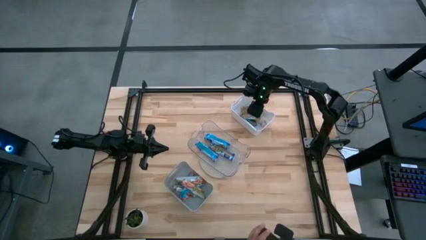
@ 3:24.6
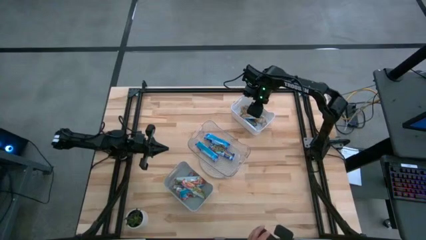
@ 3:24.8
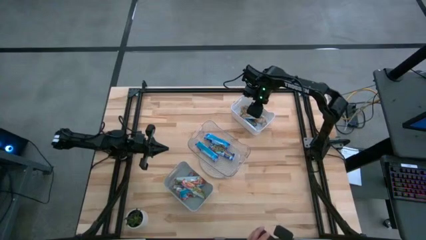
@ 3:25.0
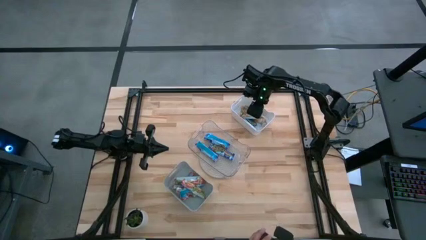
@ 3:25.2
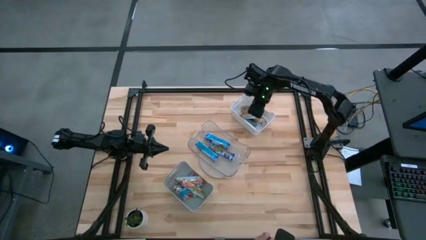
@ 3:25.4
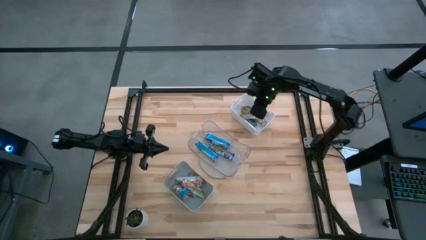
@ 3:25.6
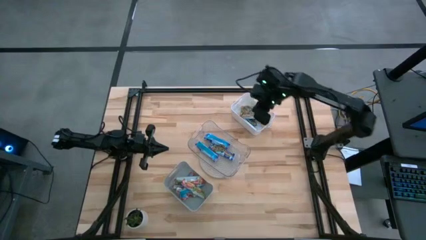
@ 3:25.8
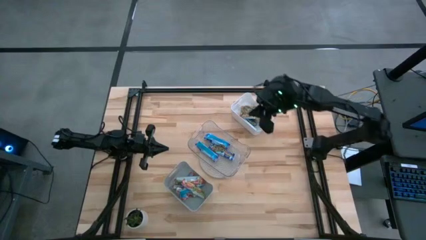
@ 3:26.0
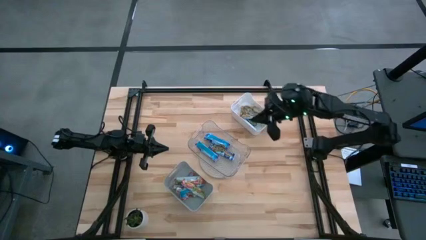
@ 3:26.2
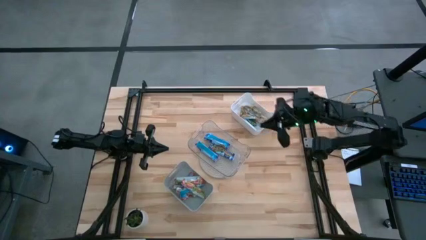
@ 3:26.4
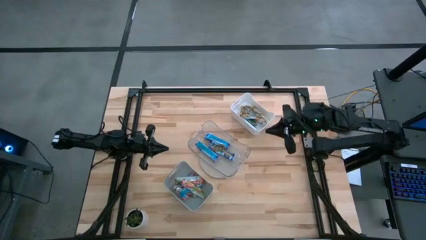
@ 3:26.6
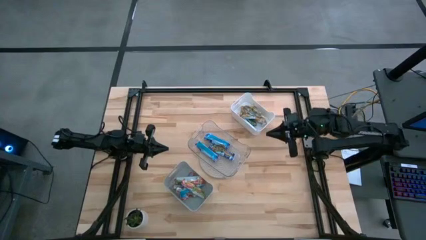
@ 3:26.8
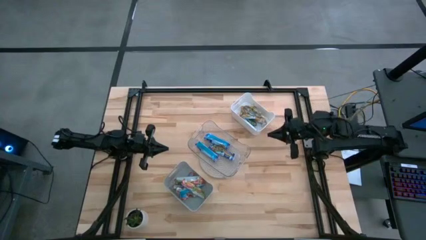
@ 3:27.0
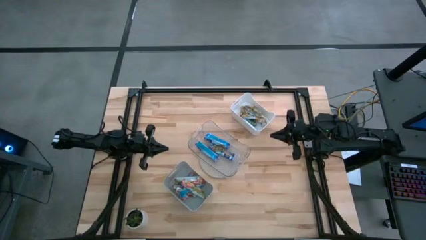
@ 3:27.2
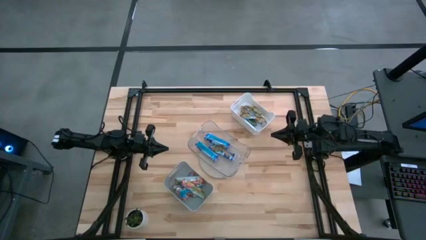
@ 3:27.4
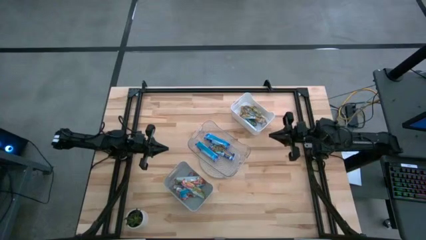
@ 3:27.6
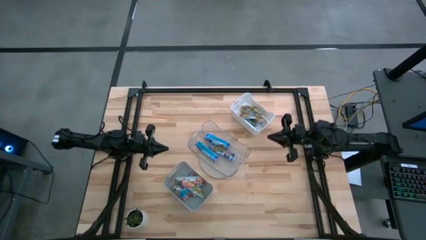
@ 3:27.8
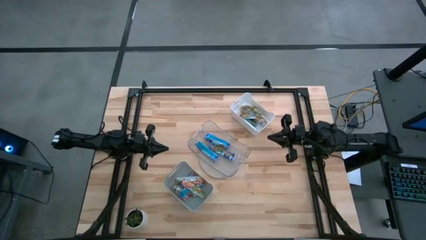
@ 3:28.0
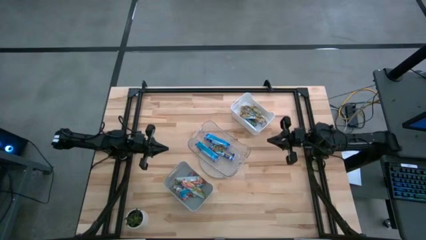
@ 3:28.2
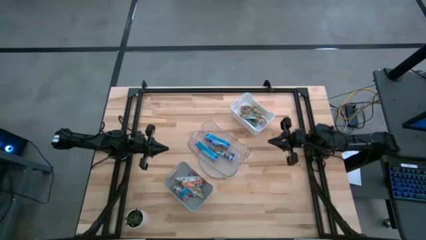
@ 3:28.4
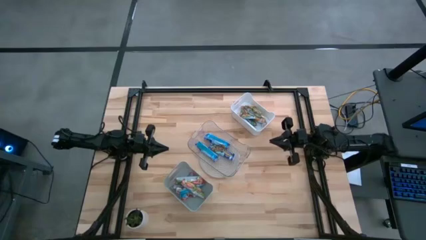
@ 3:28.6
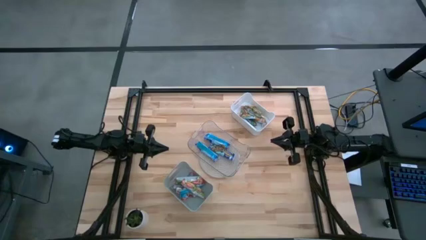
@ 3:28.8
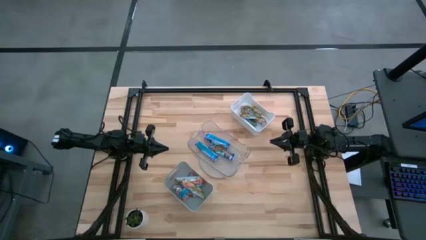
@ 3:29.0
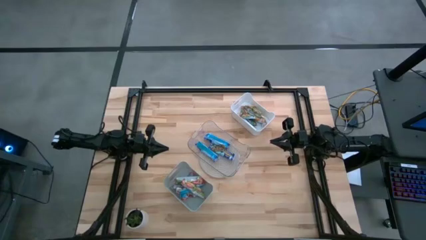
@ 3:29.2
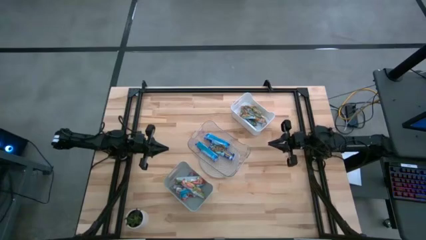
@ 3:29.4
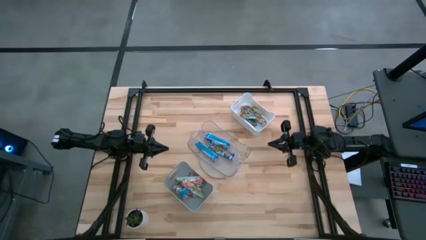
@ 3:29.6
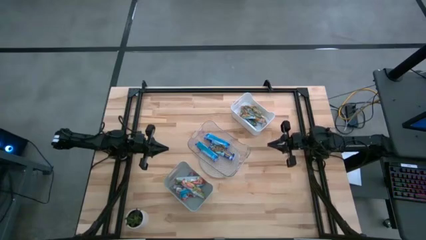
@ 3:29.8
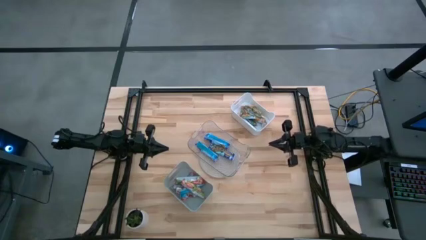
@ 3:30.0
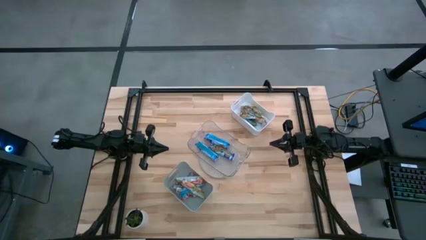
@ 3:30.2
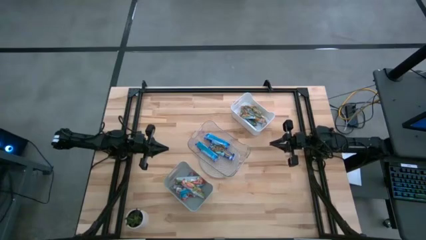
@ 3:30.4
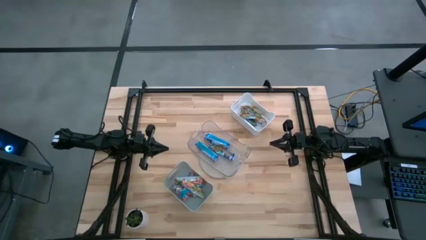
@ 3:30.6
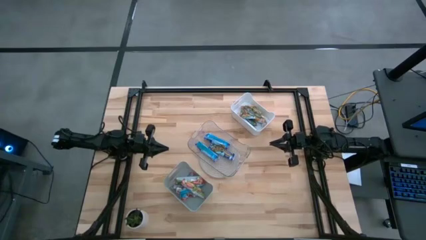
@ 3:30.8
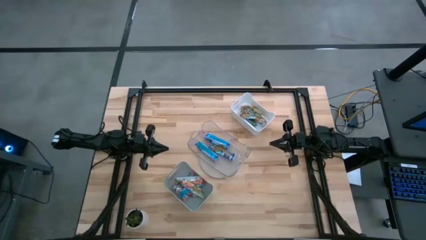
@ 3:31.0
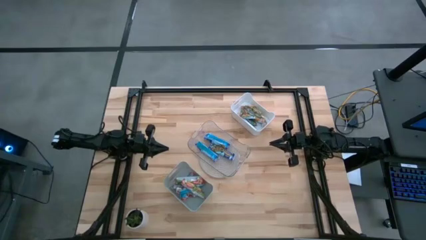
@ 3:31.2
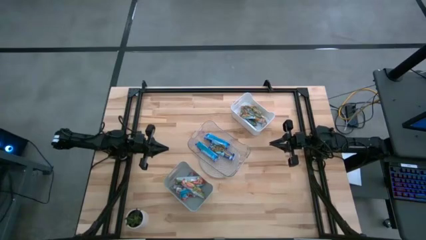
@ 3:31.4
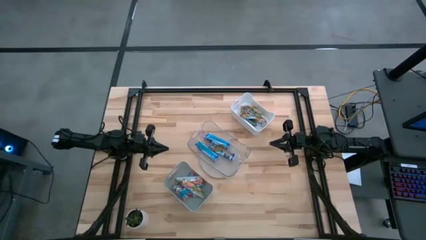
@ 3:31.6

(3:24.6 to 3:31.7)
Task: Pick and place Granola Bars by type
Return to Home Position

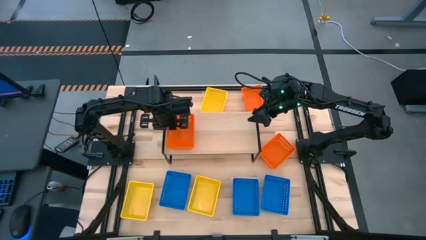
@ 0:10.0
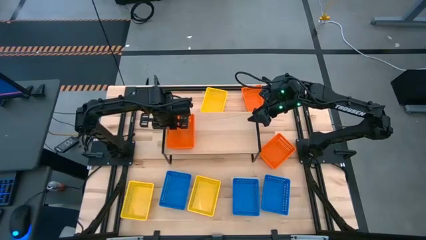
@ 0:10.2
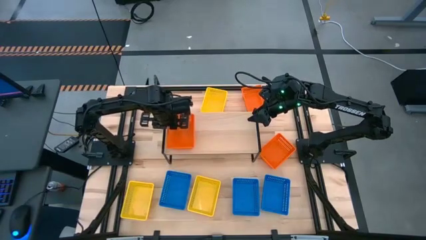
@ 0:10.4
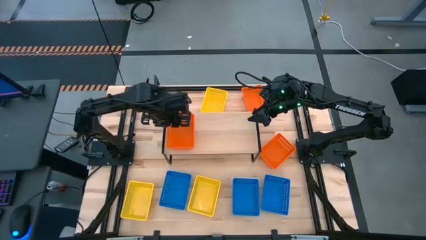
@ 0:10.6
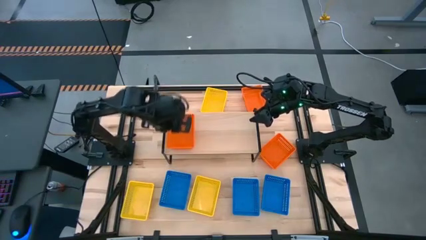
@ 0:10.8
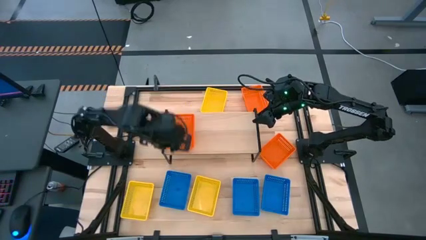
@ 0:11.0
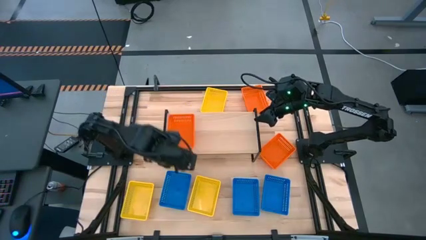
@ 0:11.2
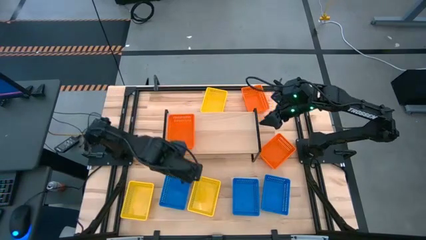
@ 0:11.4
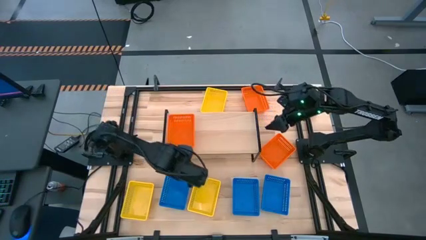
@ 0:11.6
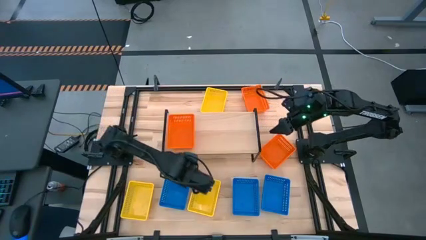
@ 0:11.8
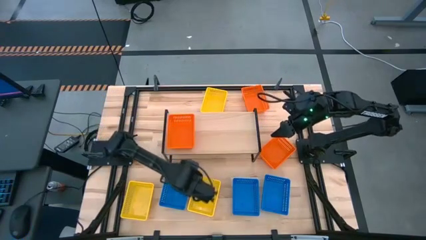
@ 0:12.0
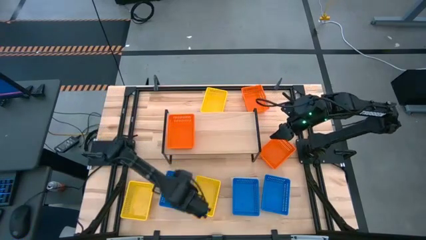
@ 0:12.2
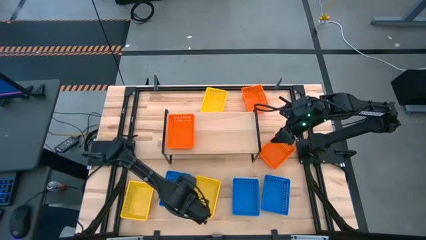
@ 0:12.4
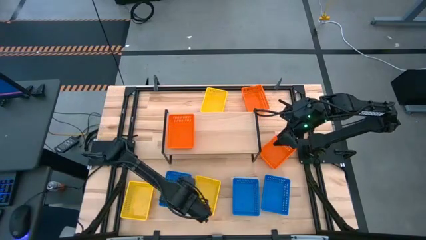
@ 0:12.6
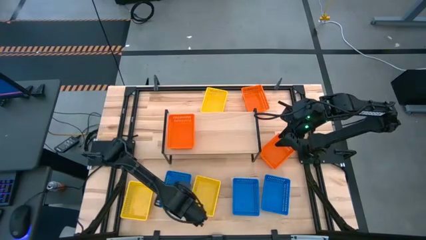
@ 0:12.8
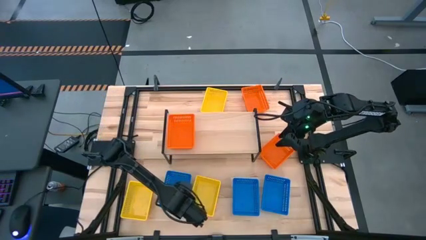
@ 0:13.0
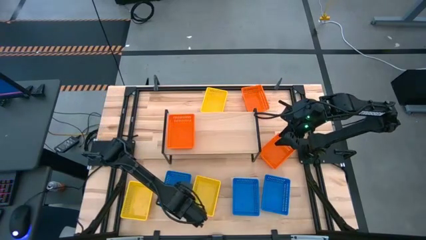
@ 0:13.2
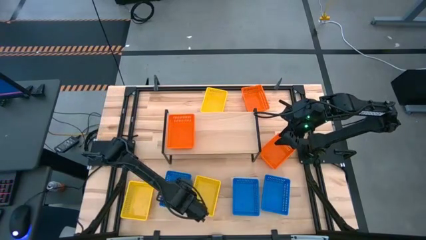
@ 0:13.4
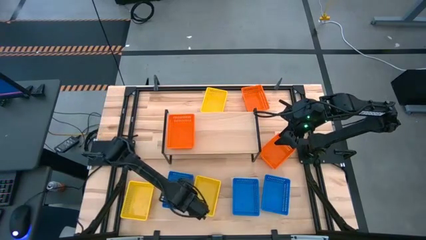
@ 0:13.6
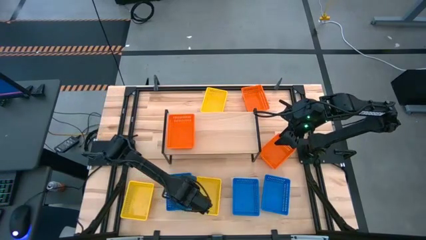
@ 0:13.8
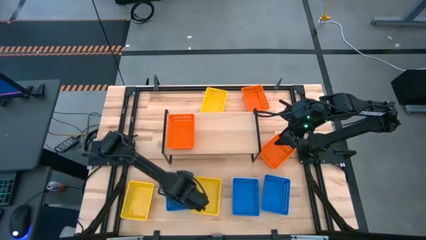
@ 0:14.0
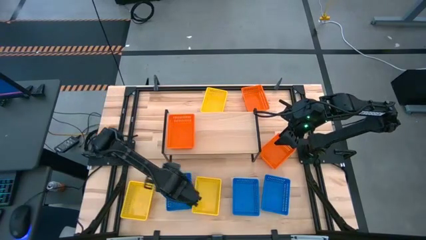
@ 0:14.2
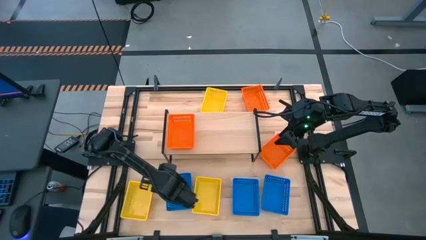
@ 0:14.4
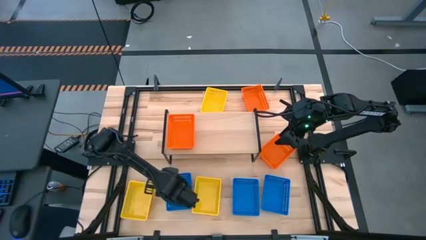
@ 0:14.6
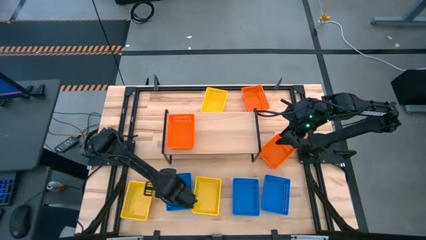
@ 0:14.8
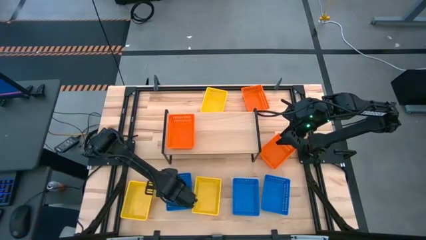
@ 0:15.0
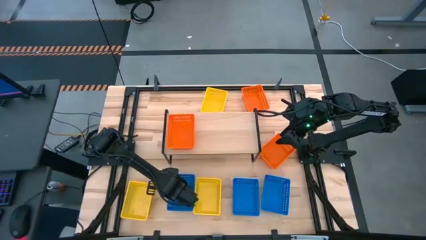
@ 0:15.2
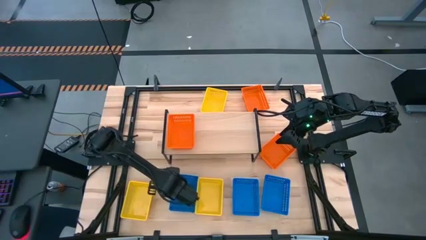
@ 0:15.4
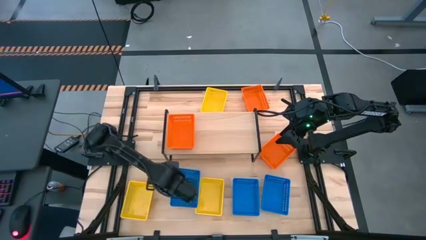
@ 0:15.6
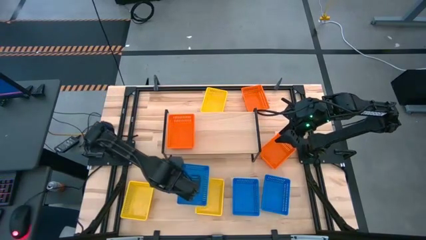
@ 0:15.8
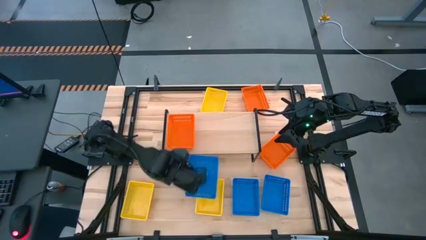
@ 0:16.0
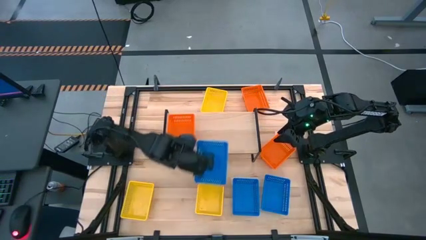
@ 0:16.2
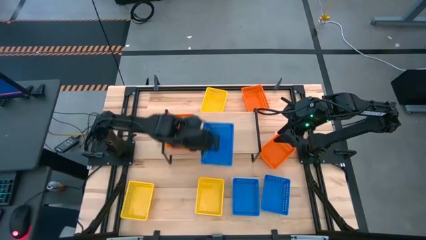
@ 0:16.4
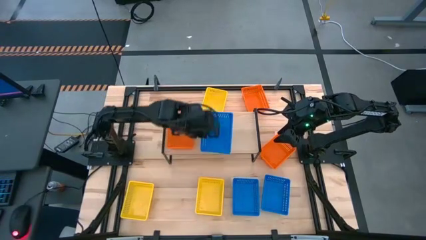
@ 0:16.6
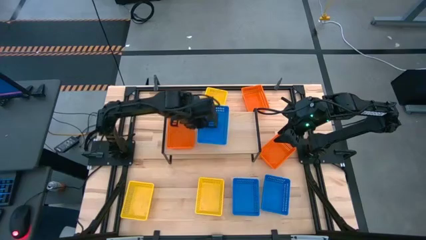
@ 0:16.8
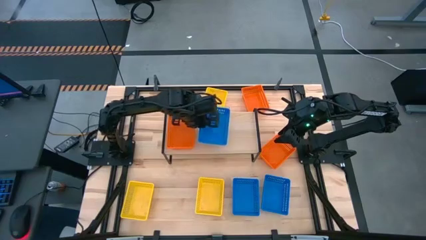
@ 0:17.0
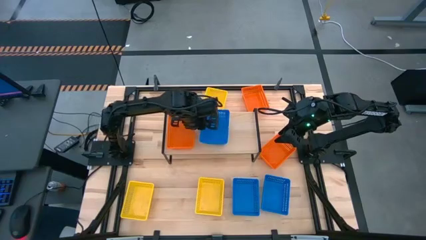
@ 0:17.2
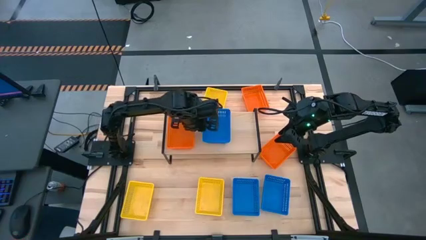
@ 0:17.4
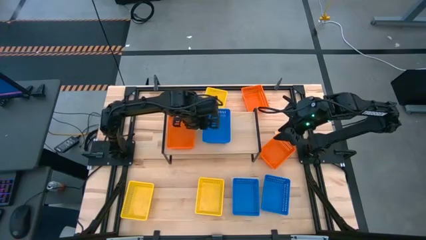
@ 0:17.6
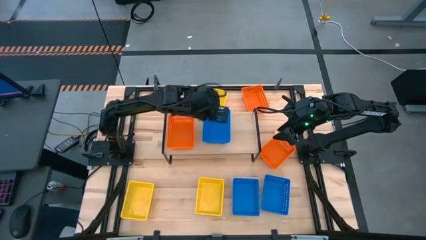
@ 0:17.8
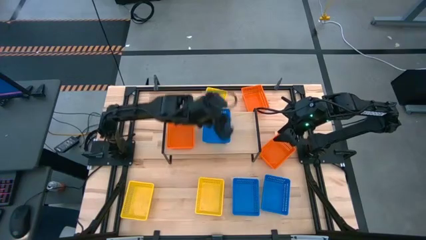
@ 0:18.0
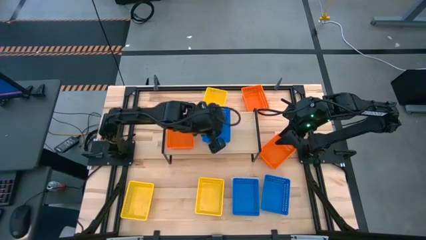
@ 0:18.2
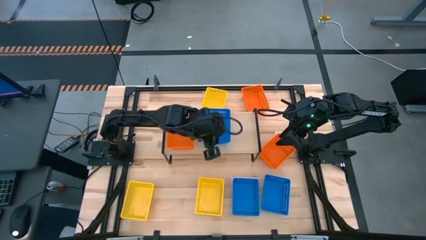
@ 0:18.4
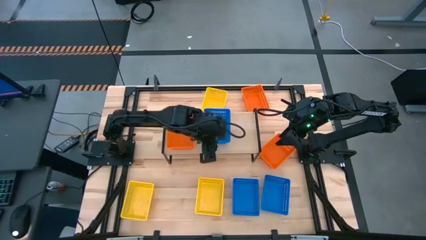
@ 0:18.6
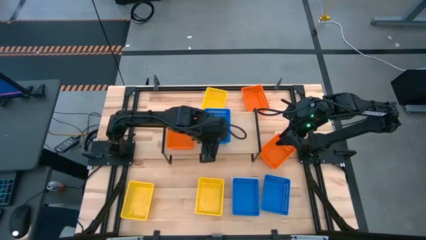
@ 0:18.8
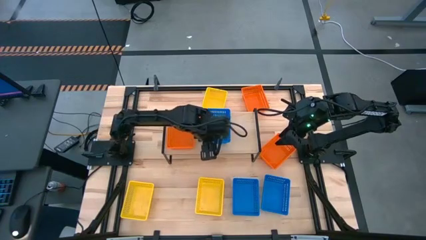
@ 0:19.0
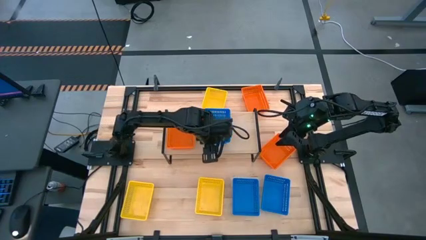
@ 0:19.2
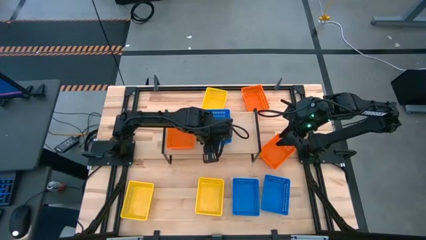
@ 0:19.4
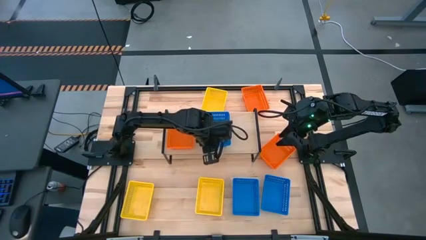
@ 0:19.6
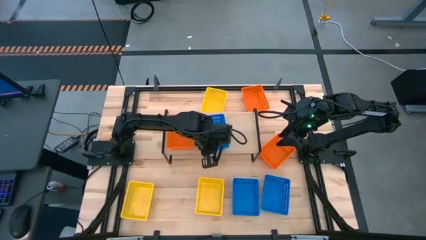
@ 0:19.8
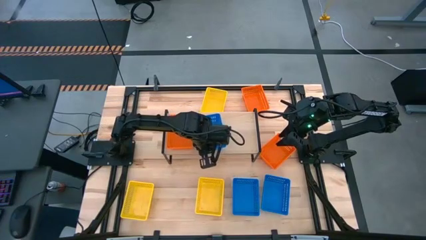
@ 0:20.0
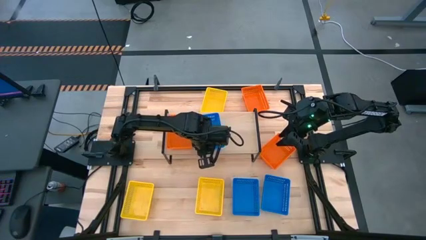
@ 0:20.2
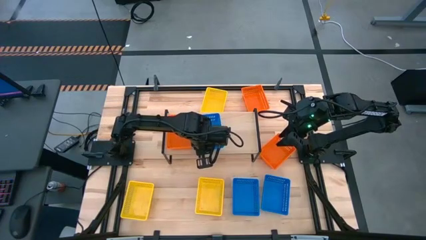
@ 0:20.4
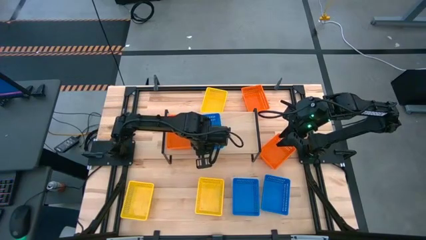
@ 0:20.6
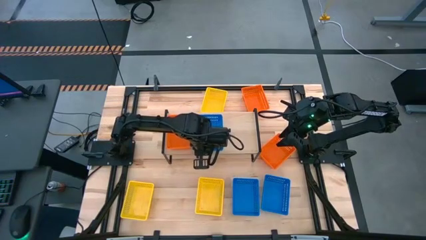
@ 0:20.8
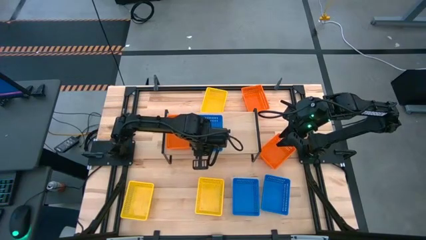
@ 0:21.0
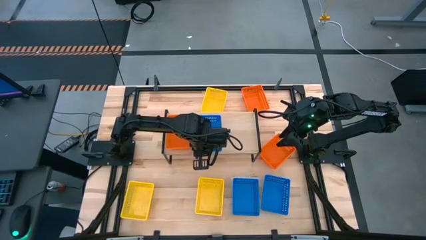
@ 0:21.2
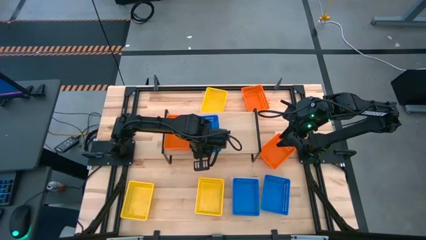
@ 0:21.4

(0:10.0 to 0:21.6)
Task: Stack baskets on shelf by color
Put the left blue bin on the shelf
